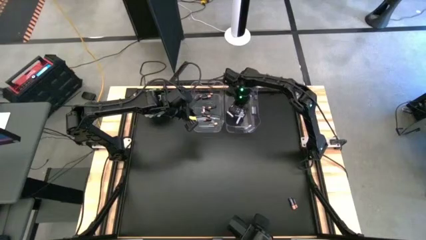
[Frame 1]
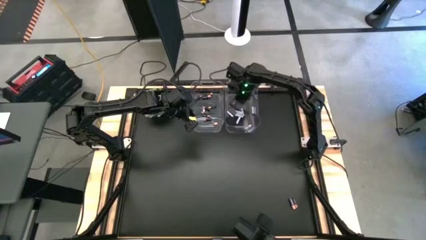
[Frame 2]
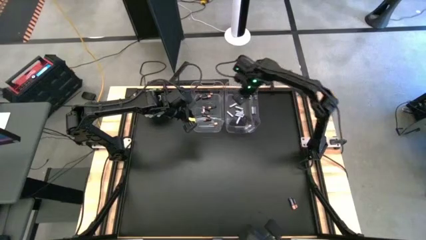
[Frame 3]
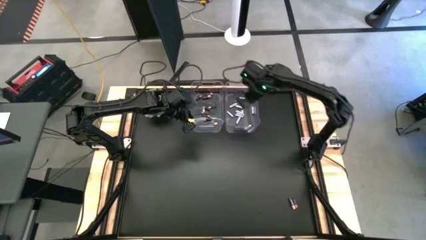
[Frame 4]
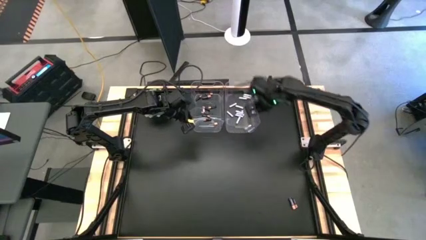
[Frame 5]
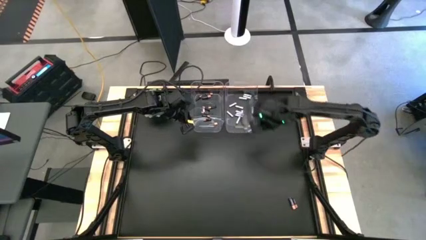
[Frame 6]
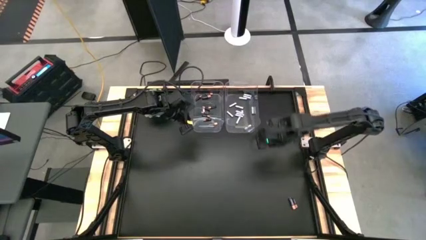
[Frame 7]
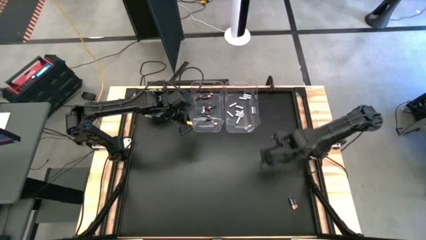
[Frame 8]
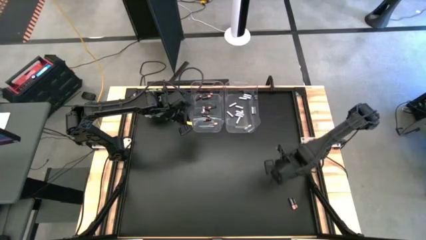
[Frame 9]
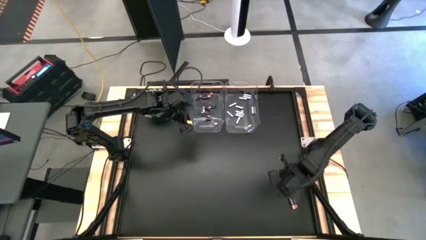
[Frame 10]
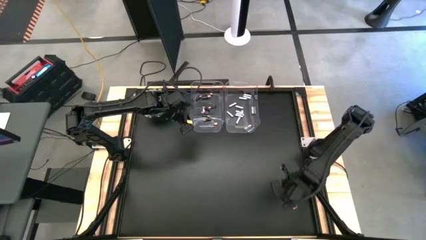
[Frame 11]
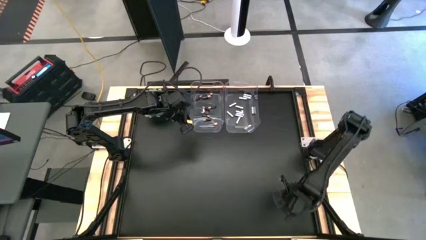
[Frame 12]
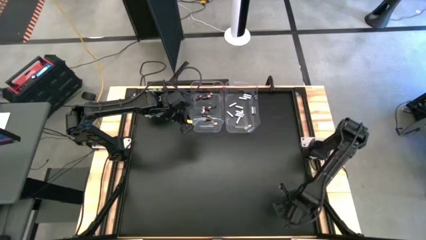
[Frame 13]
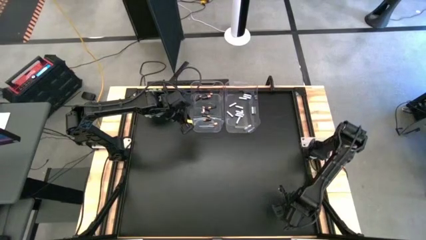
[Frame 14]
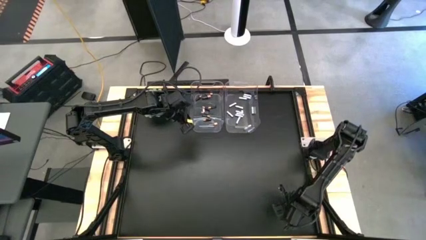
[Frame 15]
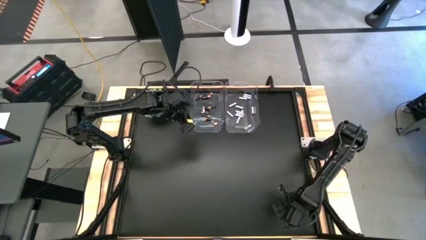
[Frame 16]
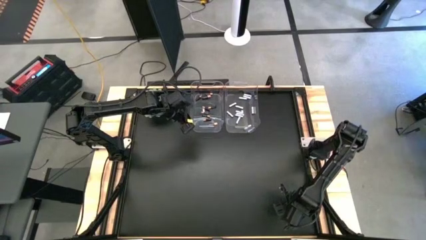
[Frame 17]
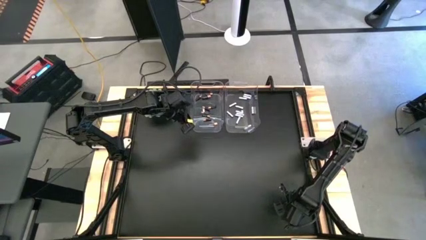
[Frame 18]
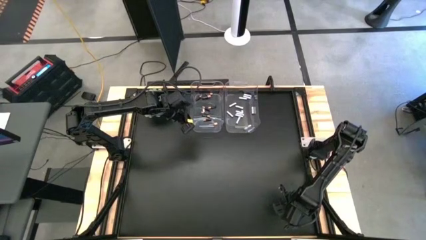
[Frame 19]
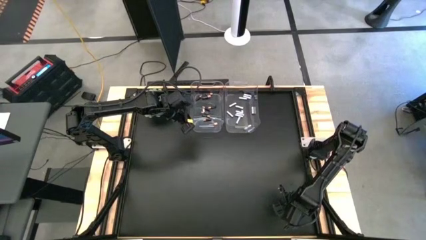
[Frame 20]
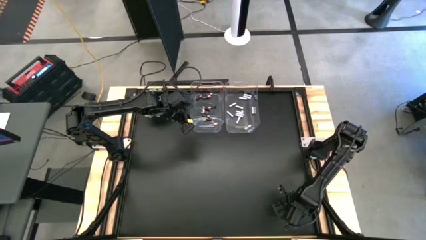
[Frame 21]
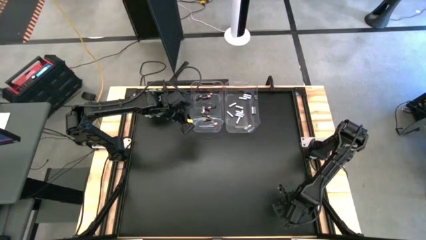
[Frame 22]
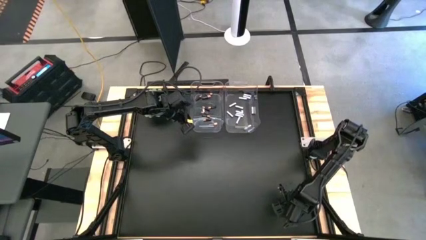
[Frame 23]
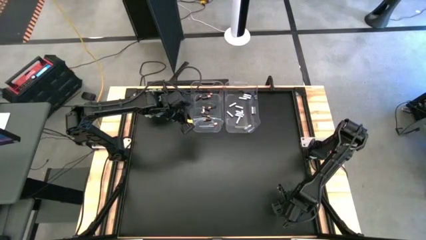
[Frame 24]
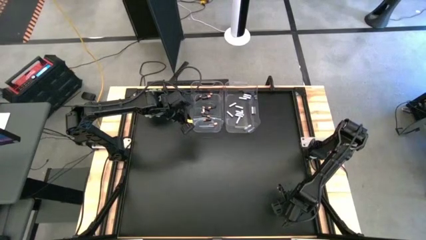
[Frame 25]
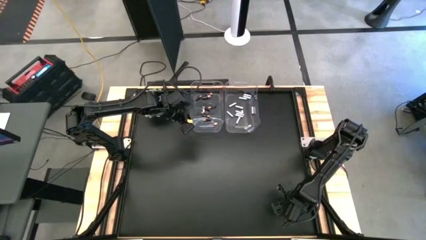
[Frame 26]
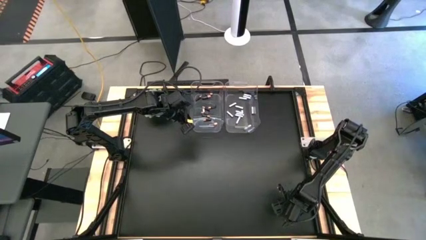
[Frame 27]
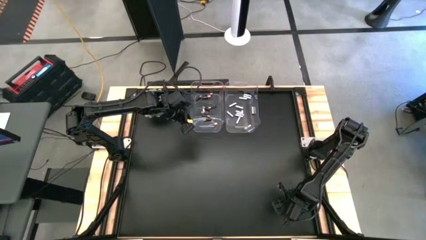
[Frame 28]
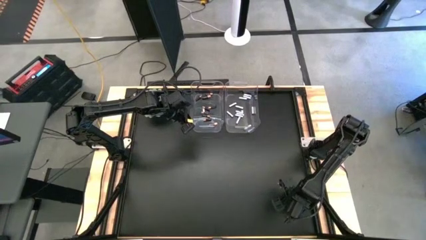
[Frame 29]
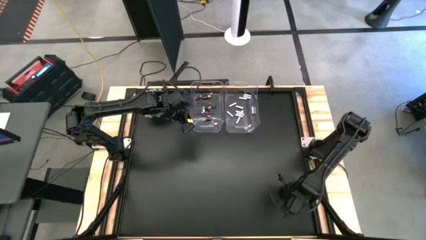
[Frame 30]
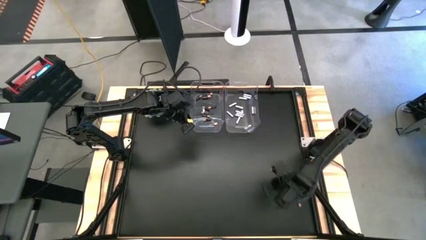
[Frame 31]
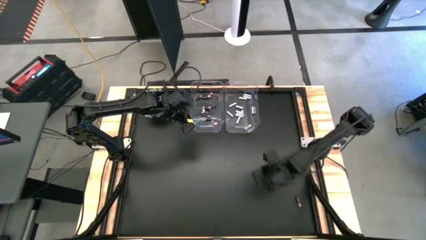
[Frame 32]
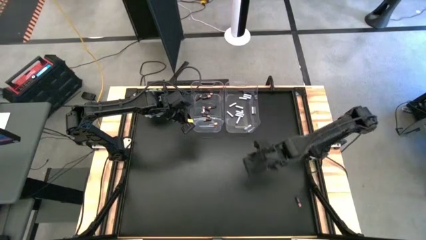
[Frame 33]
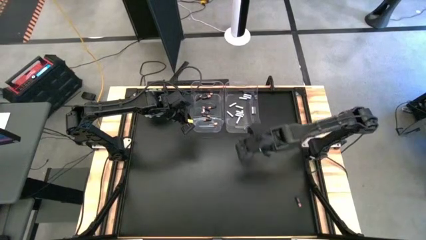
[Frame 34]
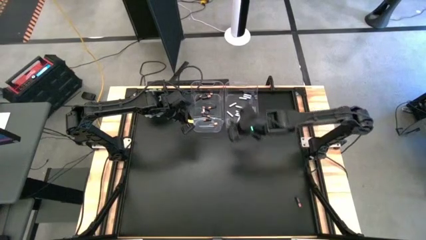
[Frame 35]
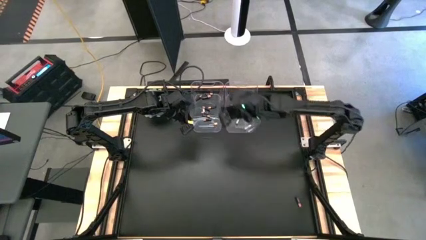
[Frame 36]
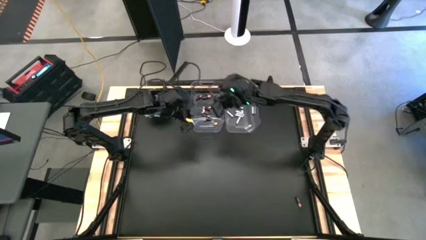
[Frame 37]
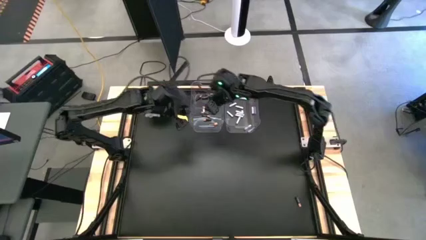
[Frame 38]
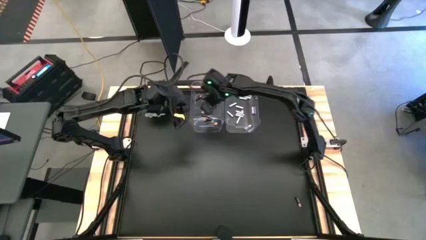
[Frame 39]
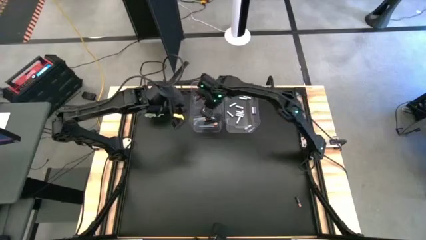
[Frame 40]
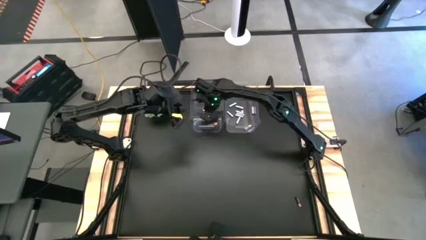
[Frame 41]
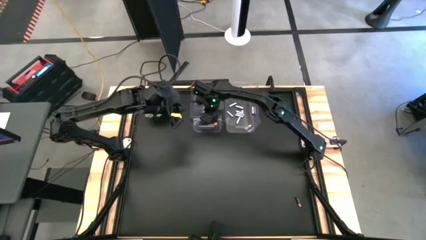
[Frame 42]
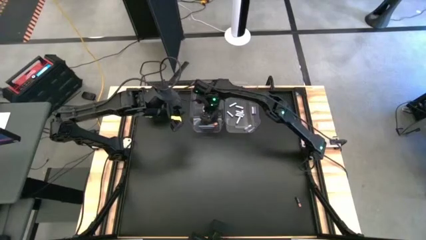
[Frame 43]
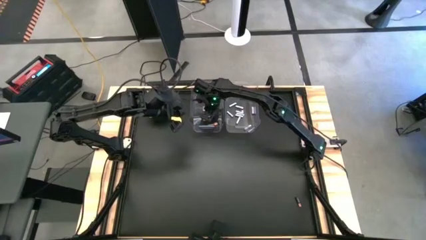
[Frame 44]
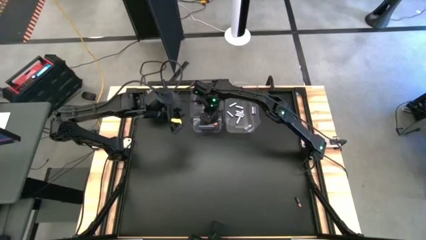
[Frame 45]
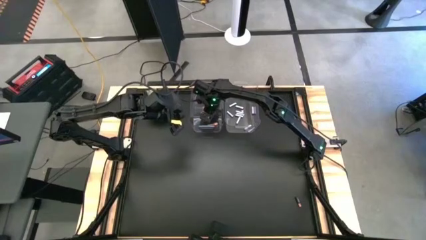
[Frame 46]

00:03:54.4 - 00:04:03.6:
Task: Sort batteries
Put the black battery into the left transparent bin

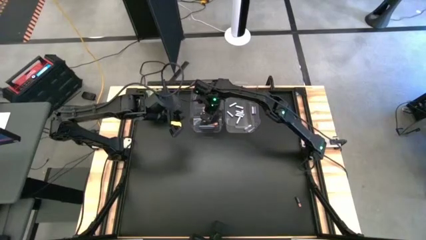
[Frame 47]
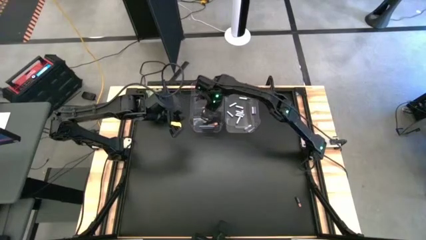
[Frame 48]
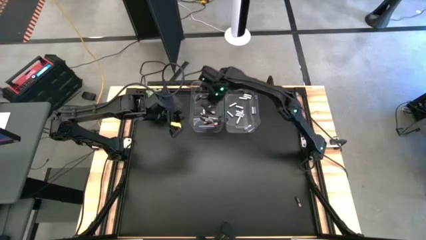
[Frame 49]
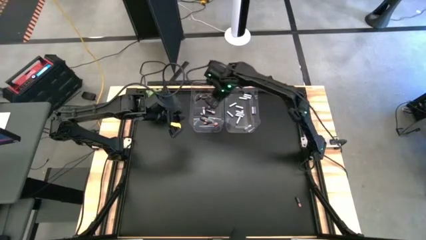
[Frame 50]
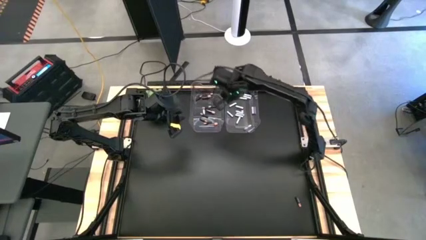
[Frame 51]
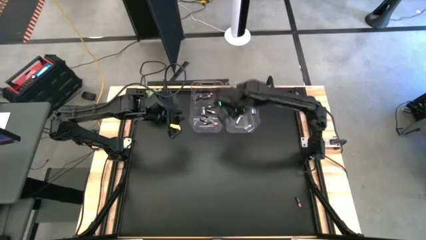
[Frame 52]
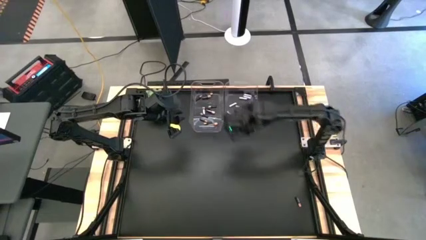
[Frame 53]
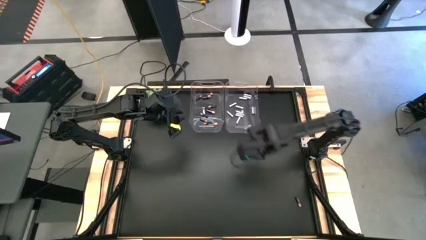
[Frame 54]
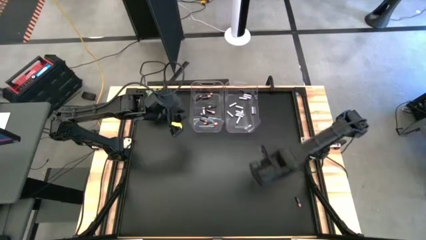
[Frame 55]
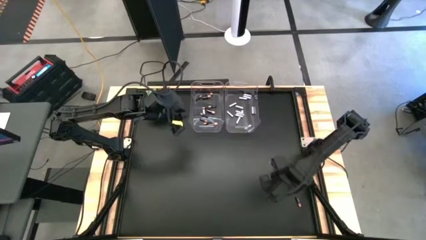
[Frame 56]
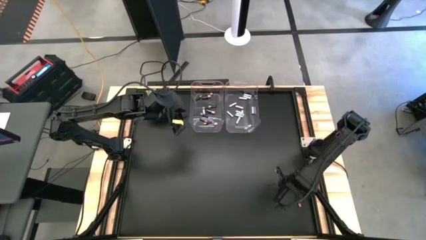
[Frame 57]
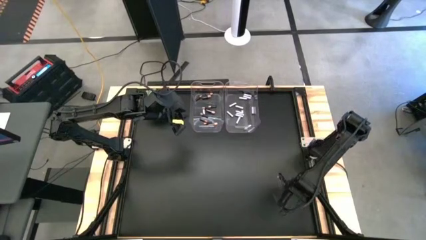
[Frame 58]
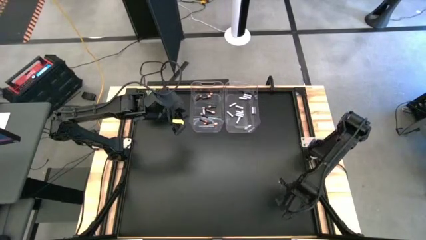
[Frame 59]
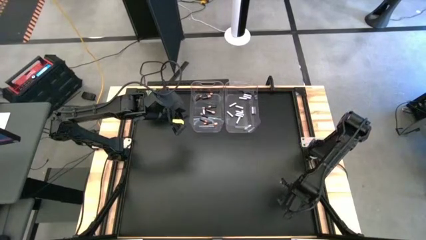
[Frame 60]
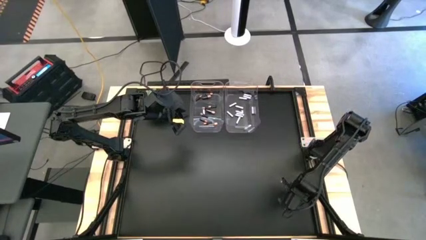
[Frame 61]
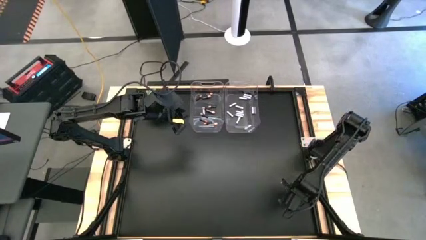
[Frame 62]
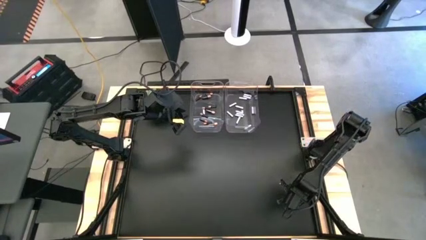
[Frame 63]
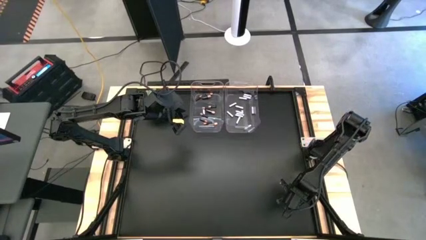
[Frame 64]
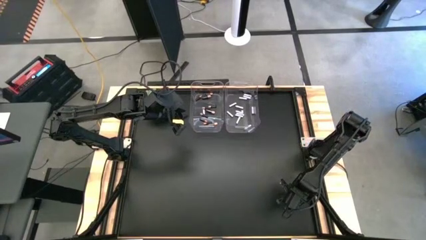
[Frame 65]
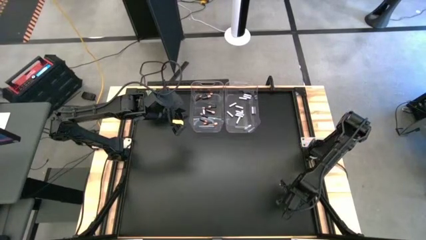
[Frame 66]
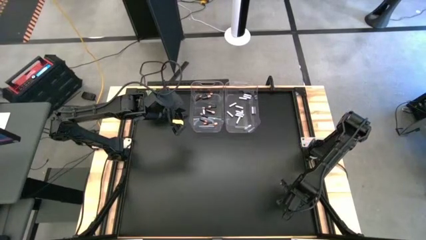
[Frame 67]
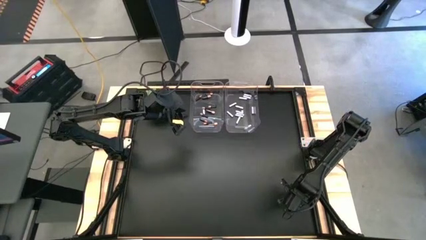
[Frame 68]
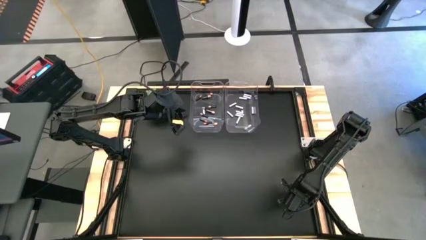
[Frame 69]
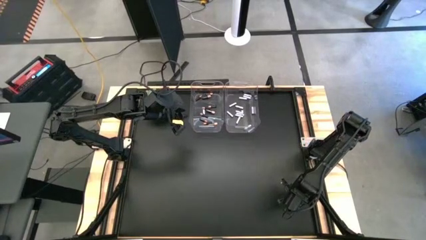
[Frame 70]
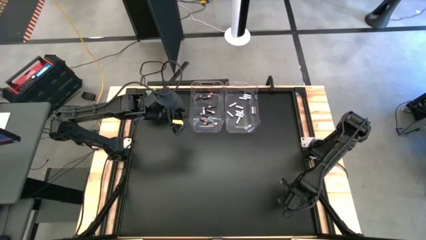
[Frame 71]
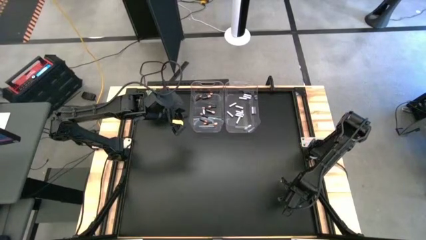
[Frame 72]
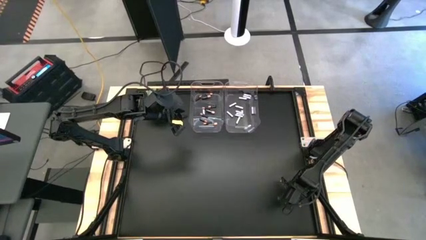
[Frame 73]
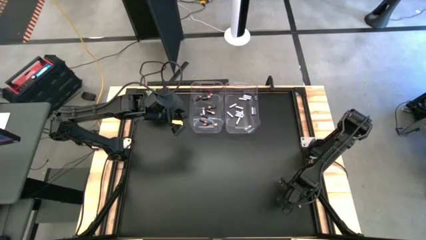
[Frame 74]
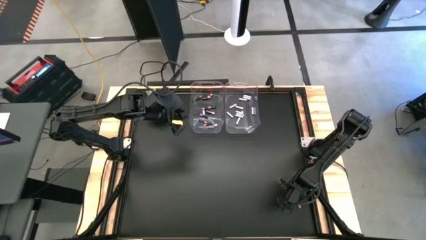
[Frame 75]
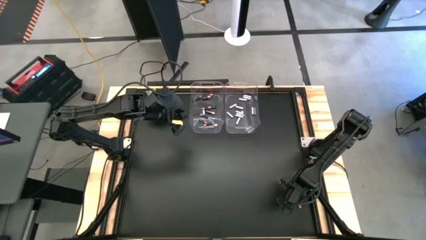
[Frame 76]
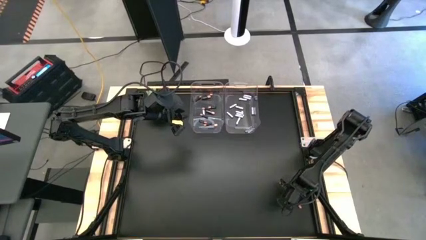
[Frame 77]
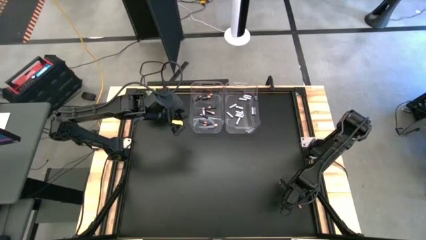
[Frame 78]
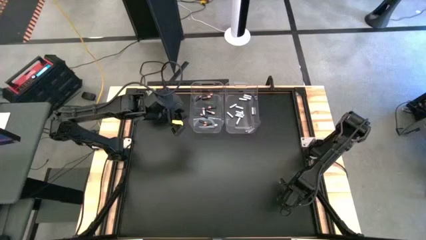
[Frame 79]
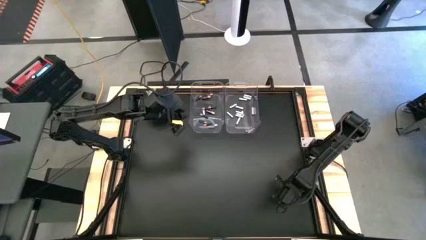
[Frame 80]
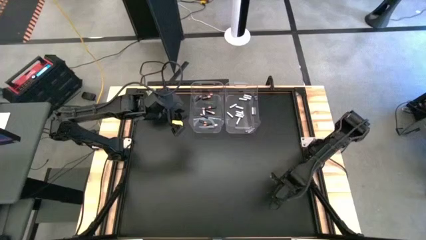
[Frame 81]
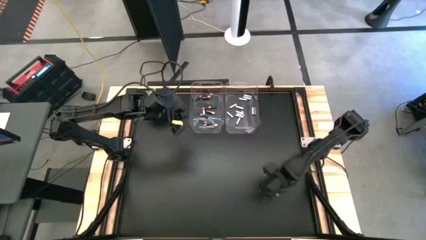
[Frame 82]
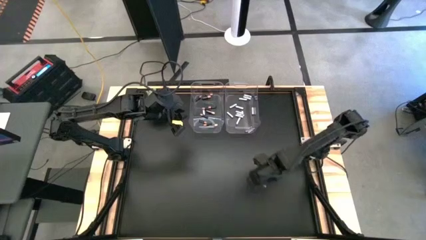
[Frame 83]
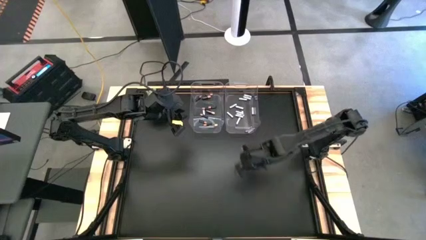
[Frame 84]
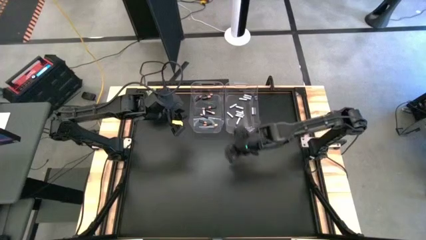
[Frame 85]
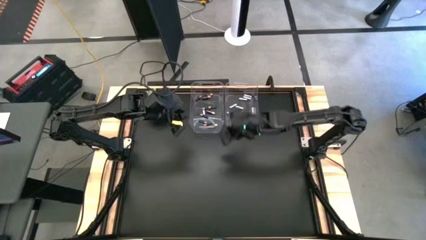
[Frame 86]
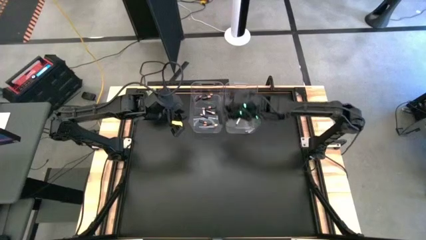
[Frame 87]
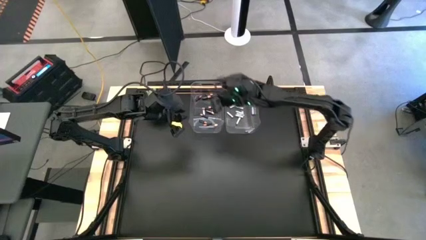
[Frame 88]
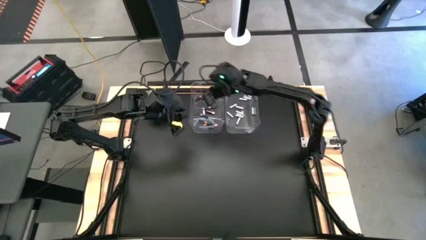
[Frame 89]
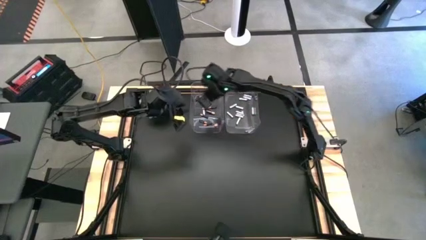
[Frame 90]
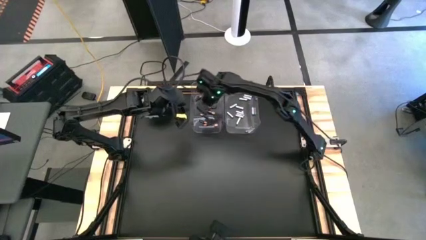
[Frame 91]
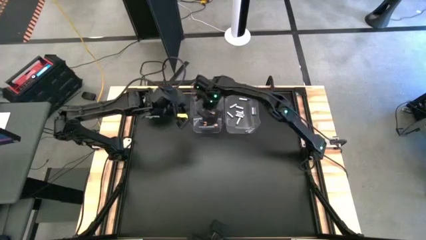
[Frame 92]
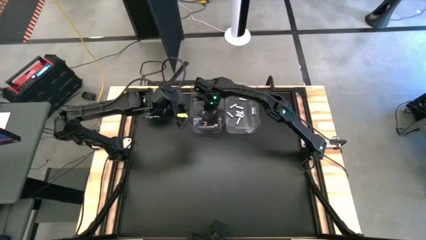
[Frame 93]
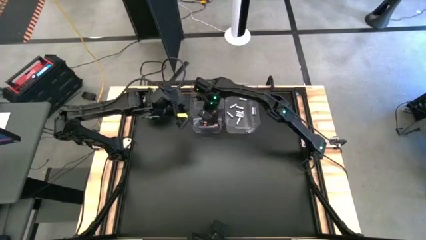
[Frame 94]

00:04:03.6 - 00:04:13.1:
Put the small black battery into the left transparent bin
